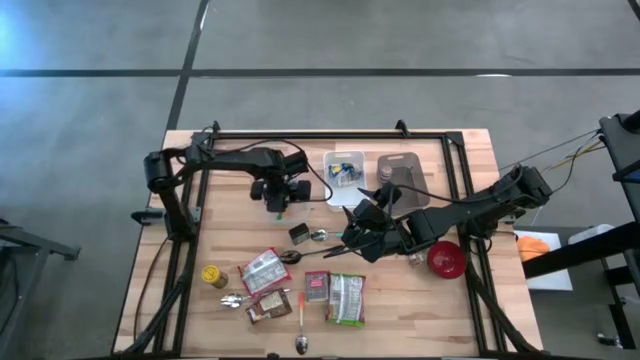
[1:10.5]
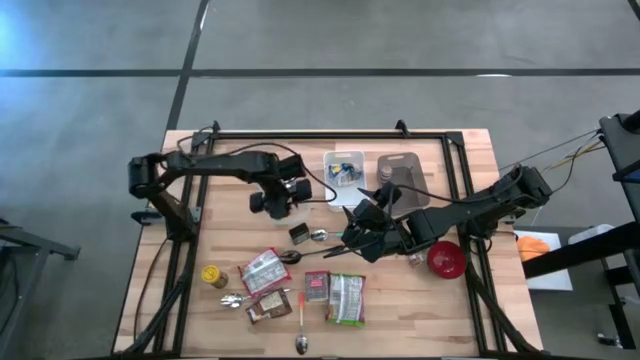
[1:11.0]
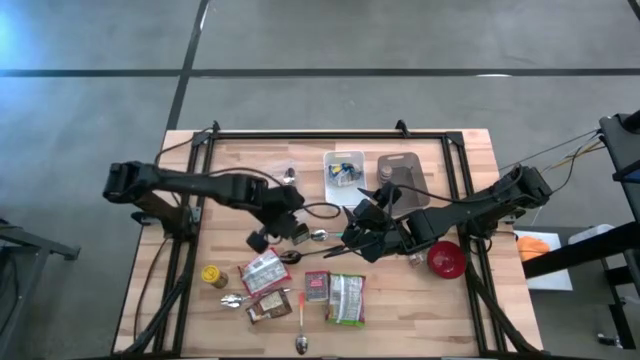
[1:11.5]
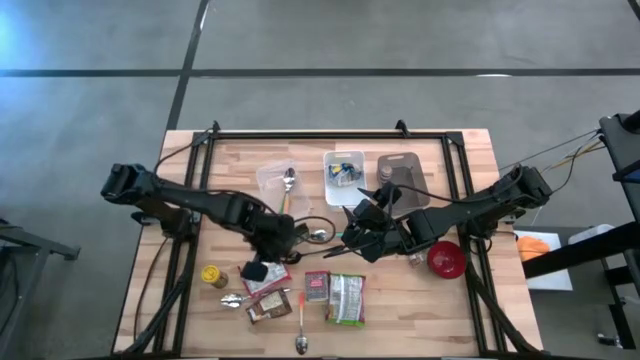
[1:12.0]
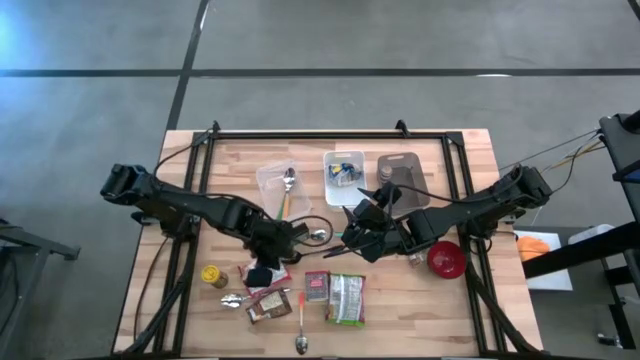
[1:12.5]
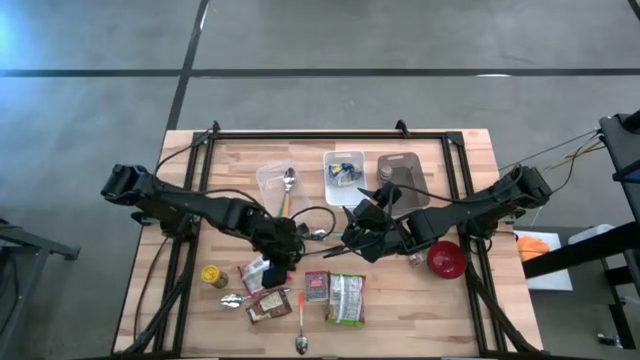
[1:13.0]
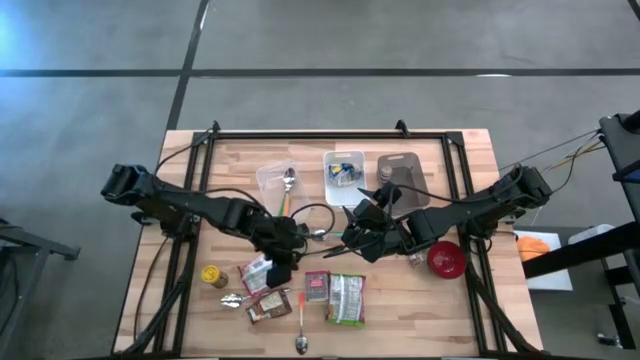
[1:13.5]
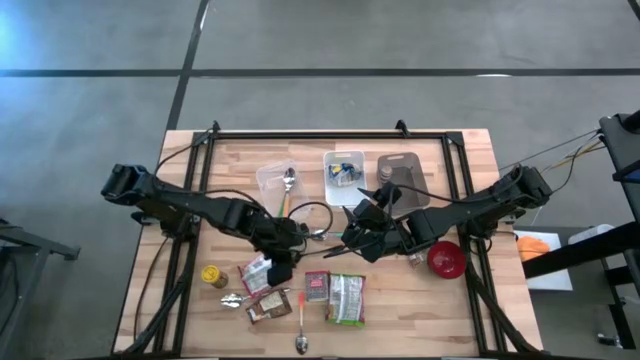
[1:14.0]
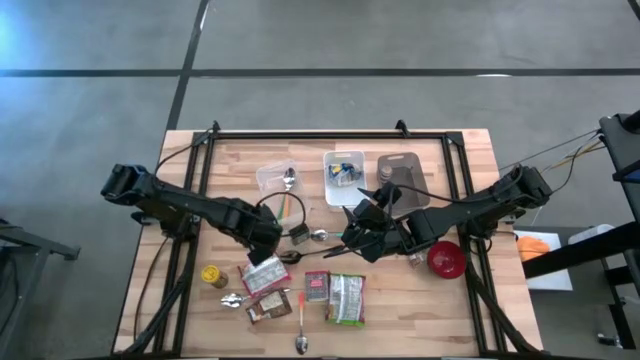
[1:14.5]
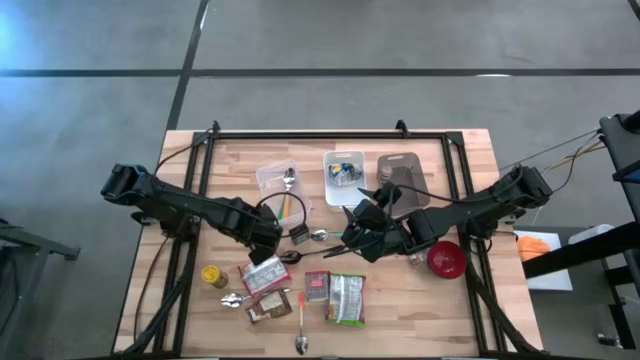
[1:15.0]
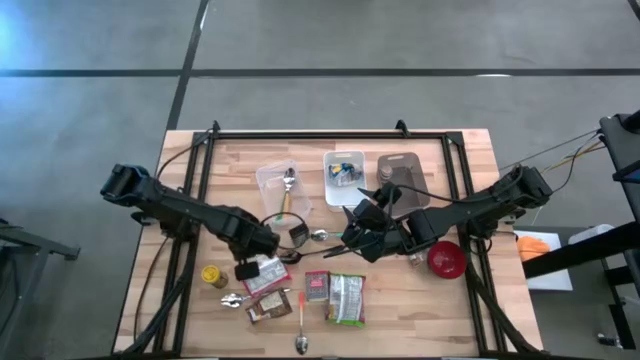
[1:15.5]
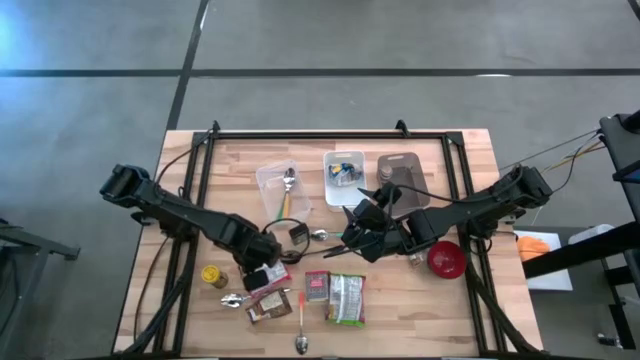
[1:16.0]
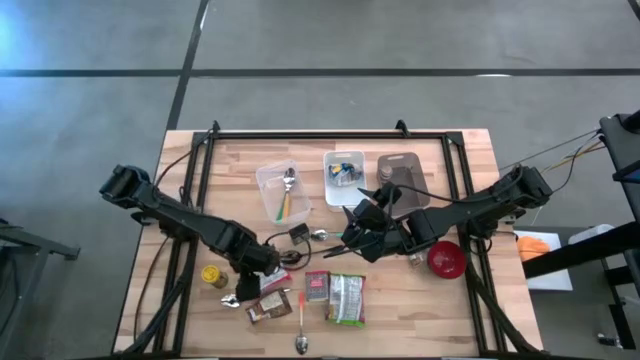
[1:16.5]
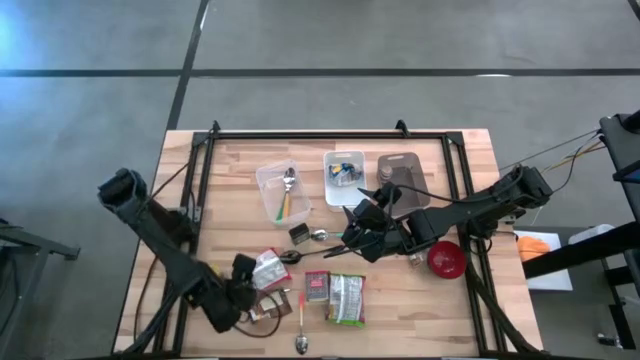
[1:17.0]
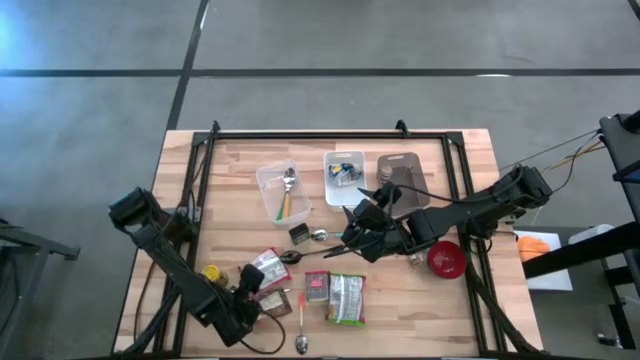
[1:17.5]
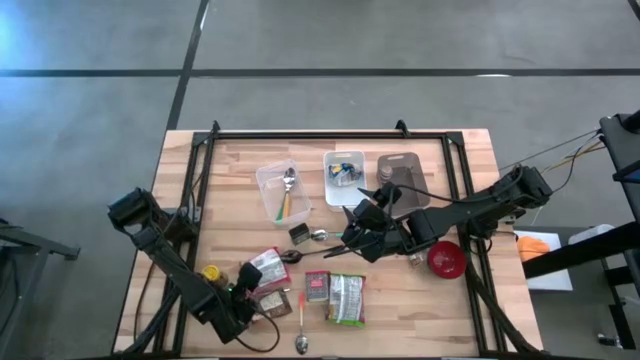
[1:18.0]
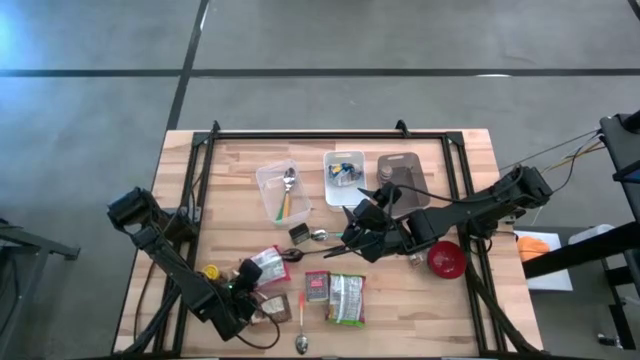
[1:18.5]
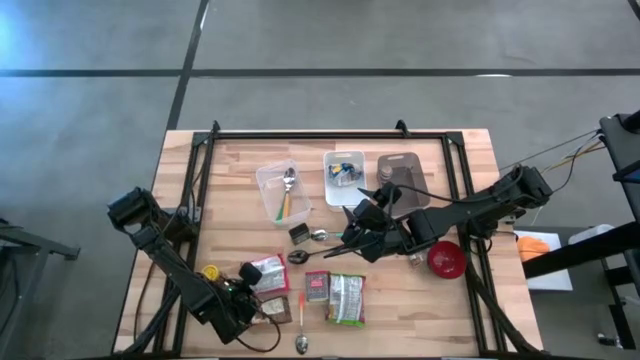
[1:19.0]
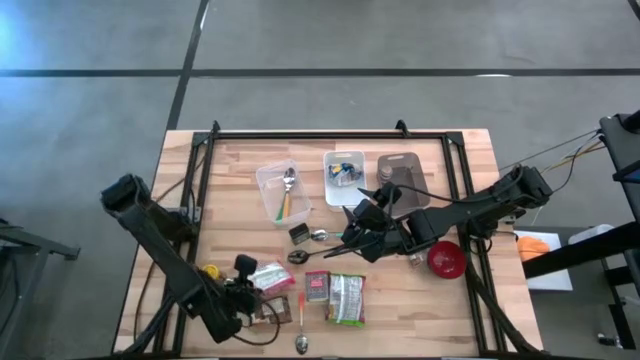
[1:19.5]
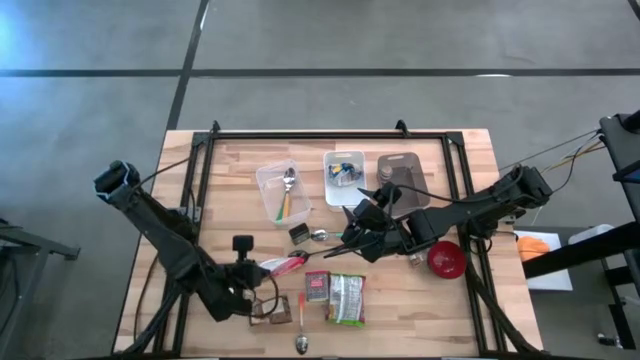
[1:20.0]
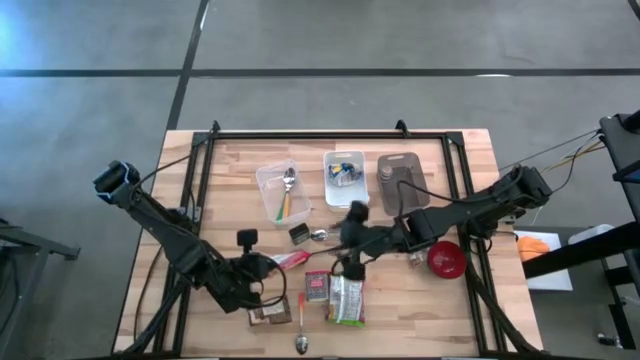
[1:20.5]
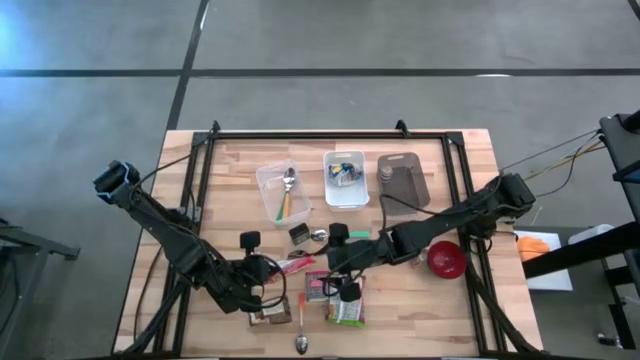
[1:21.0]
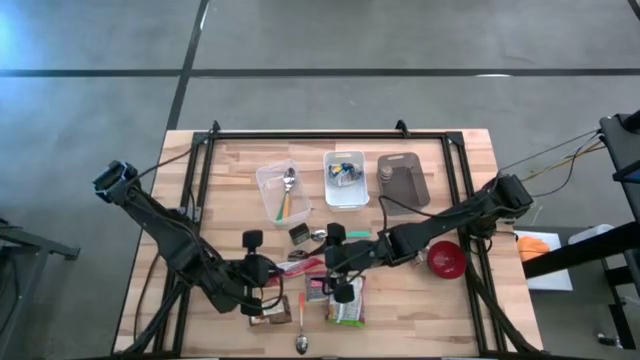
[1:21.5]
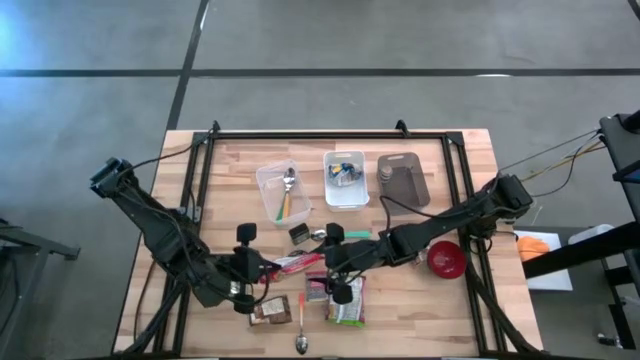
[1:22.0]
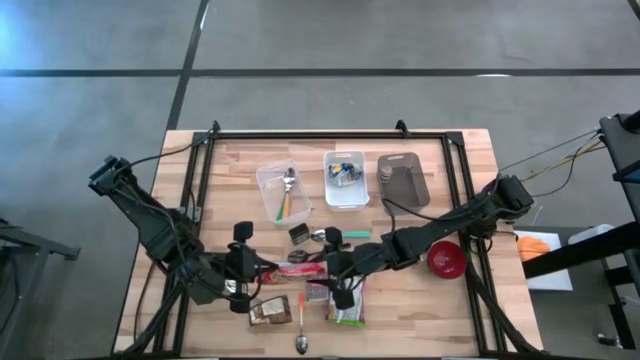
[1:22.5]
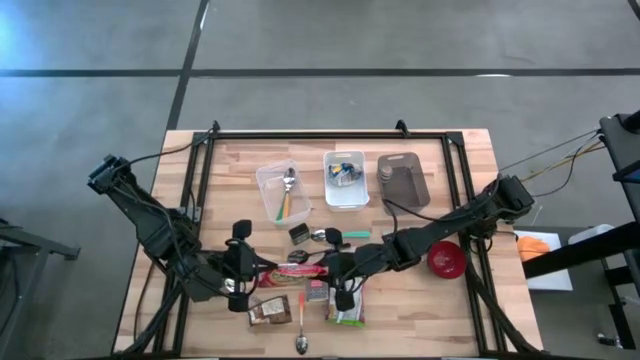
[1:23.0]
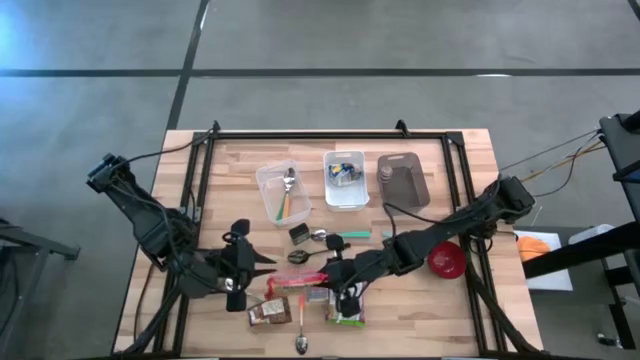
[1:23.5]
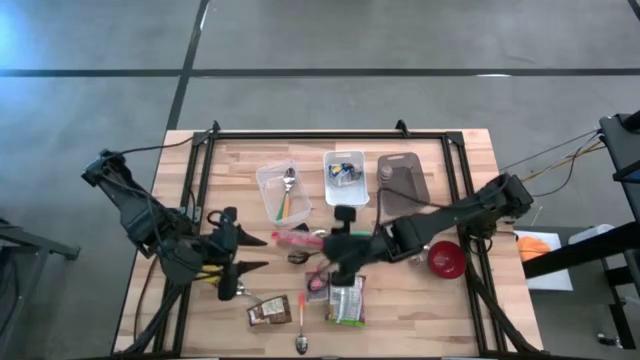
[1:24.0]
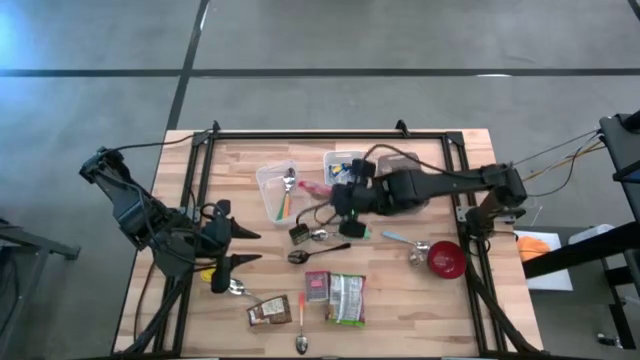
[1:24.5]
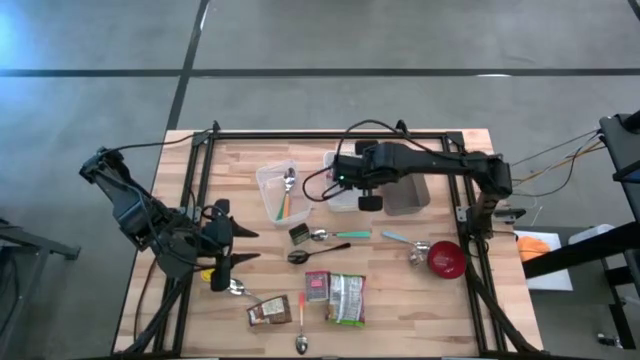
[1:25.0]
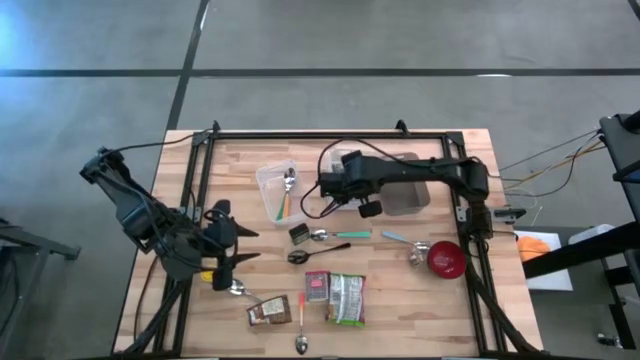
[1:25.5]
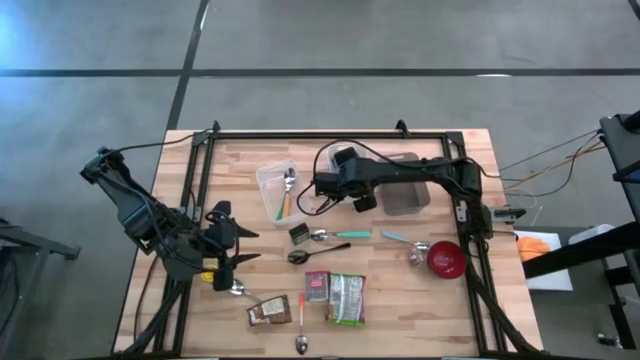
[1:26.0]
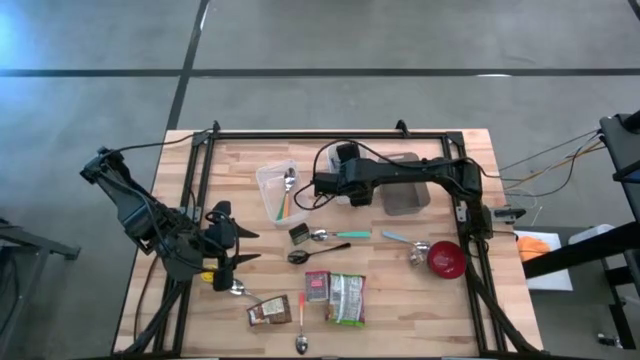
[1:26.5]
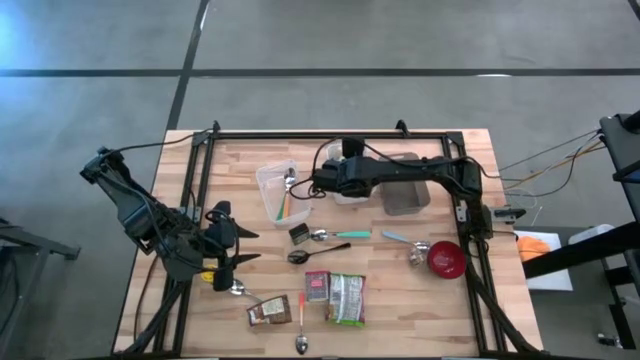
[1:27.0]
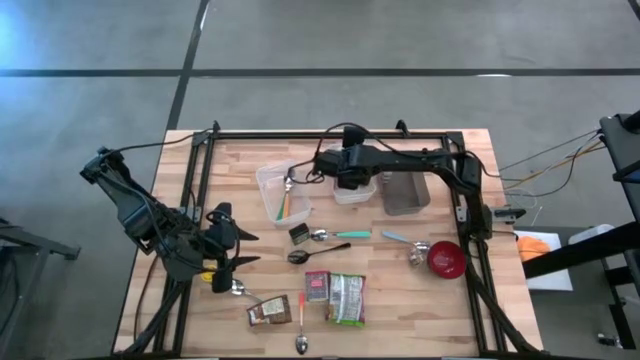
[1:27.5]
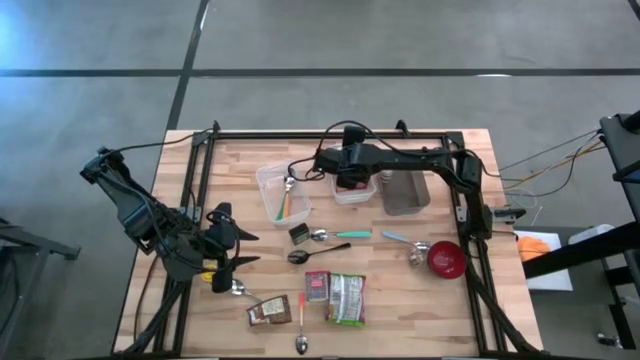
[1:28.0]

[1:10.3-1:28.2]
Put the red noodle pack into the white bin

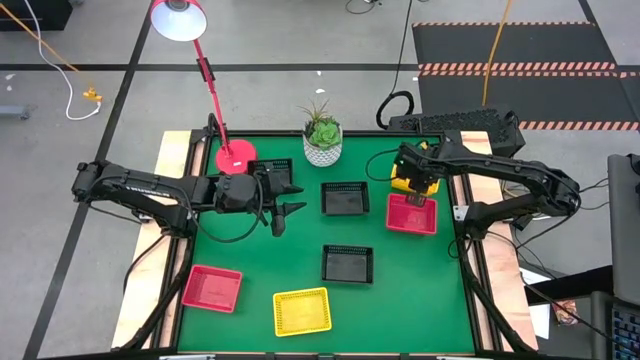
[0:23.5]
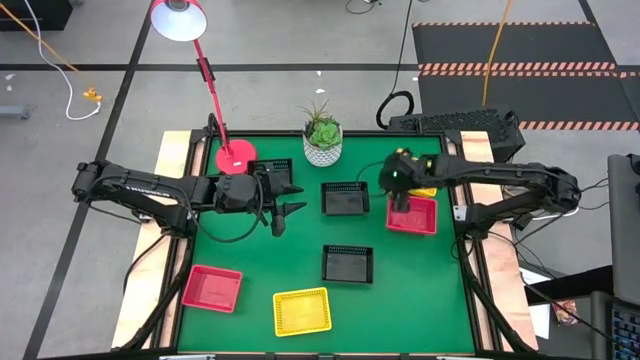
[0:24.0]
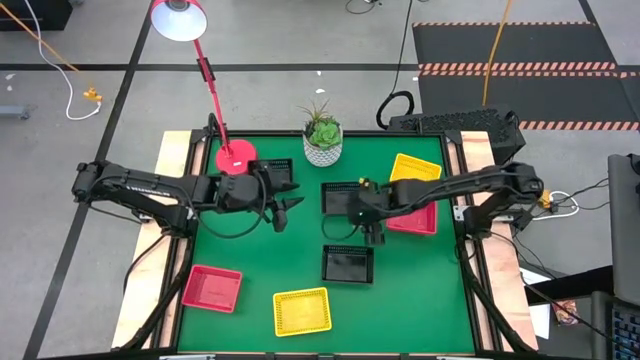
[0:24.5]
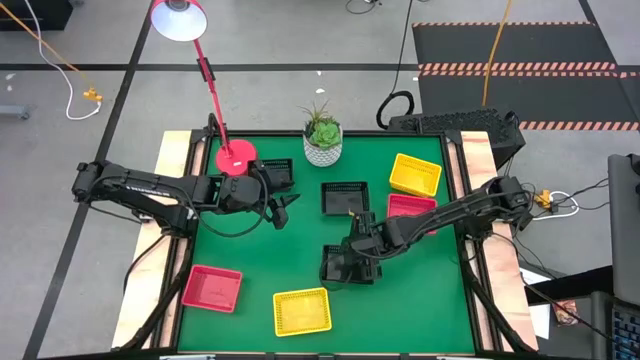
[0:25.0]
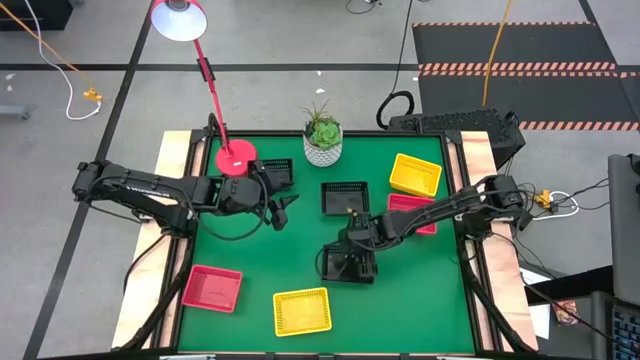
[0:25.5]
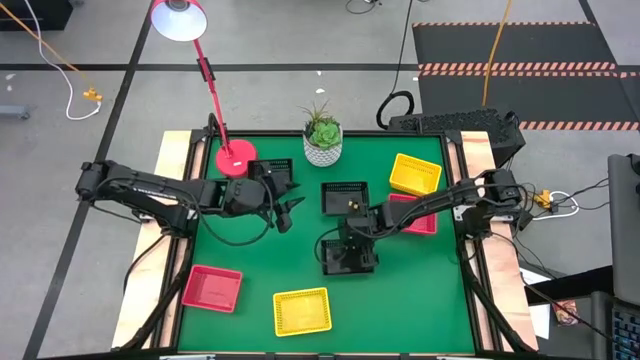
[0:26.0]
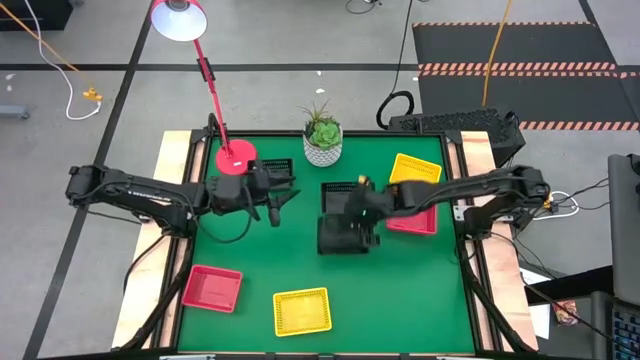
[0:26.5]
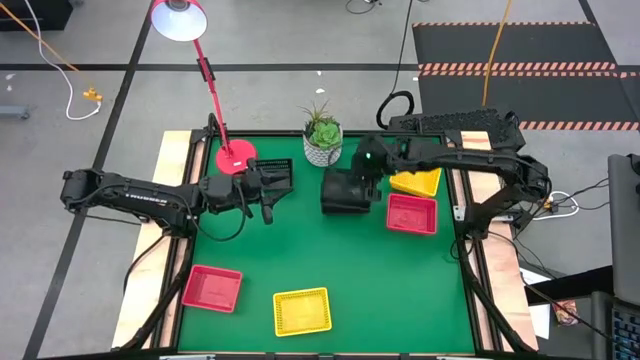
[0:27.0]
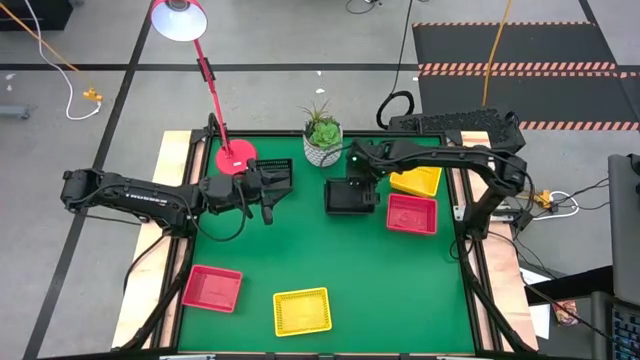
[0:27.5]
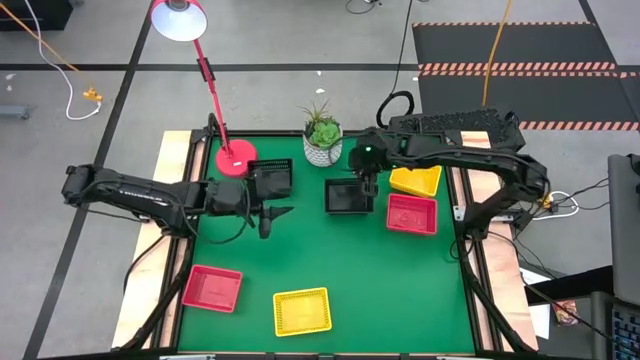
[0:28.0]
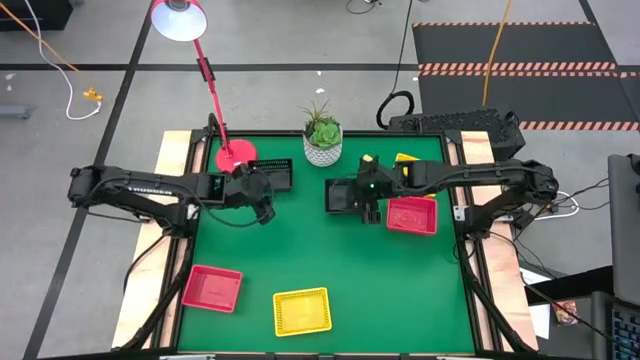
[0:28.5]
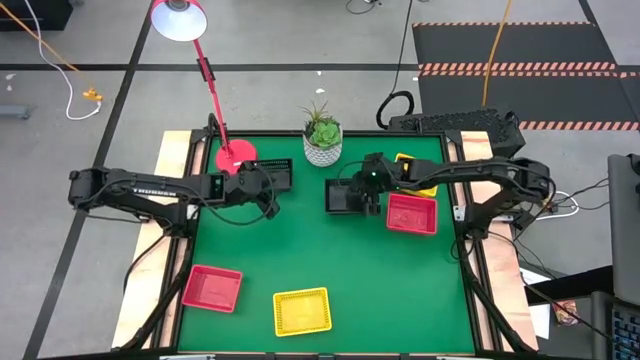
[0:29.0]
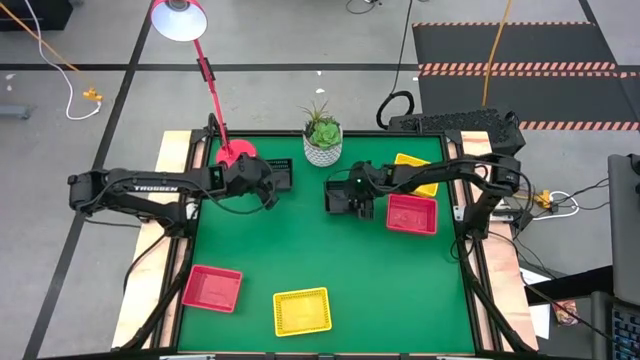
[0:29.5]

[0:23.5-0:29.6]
Stack the bottom black bin on top of the middle black bin
